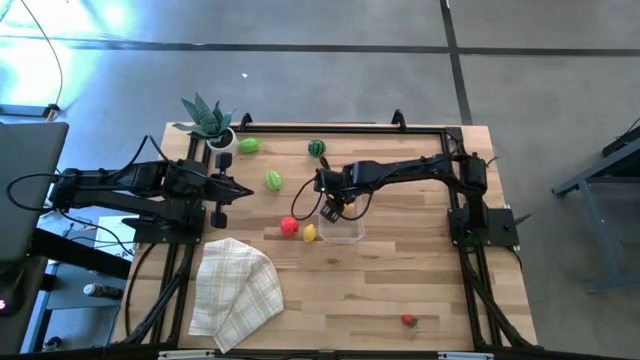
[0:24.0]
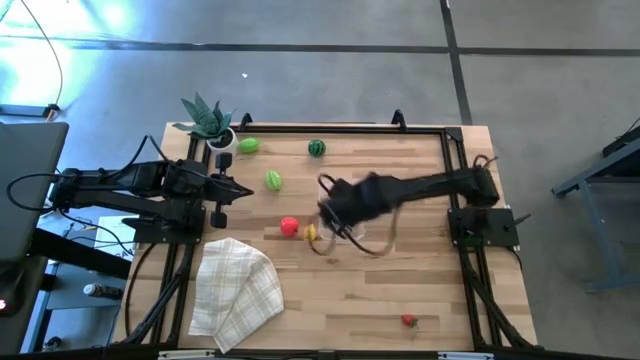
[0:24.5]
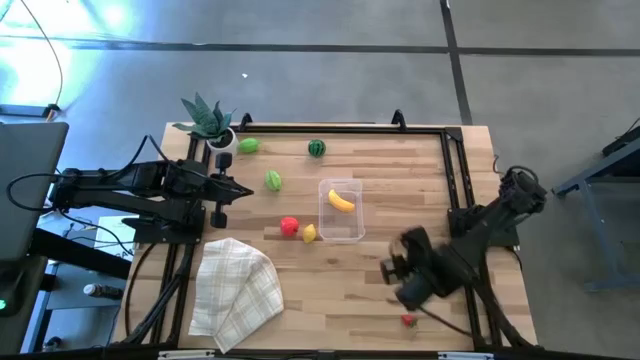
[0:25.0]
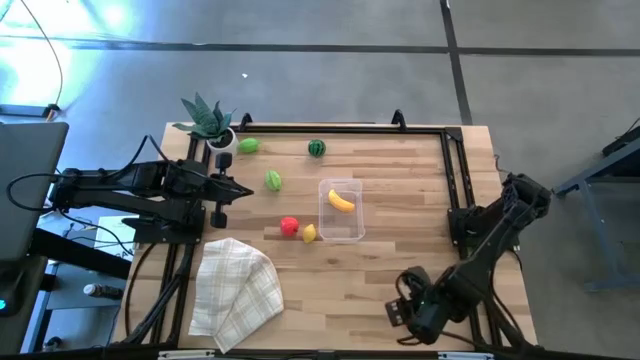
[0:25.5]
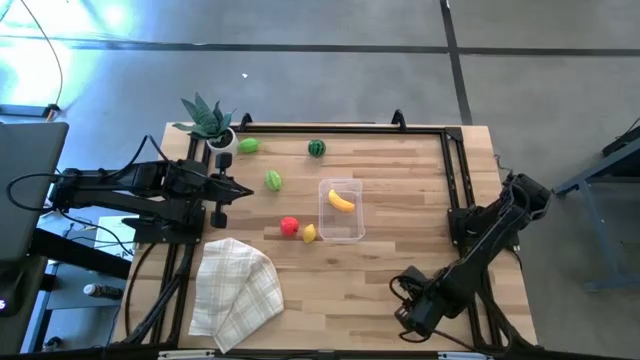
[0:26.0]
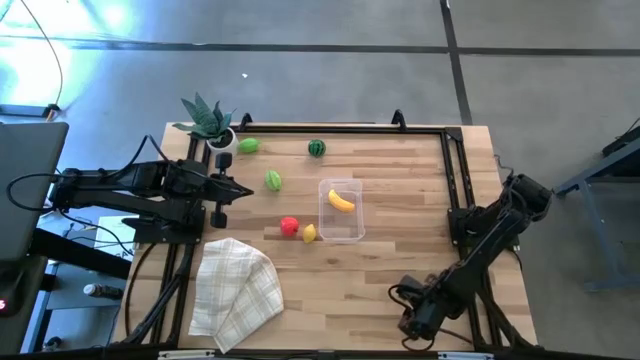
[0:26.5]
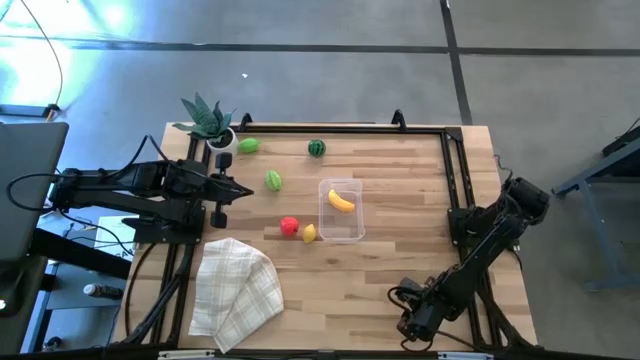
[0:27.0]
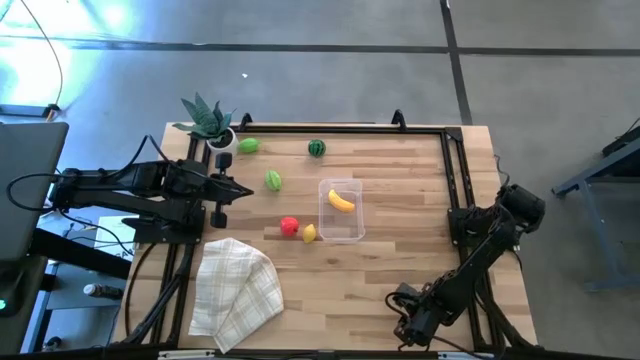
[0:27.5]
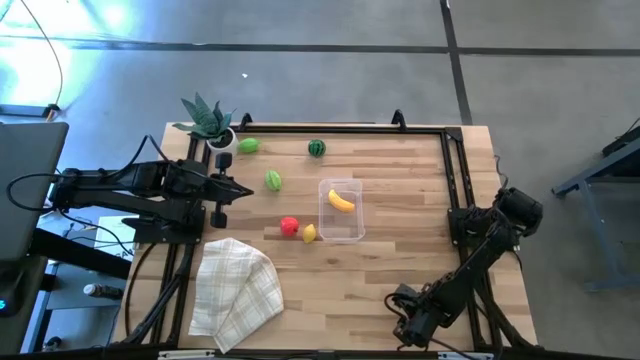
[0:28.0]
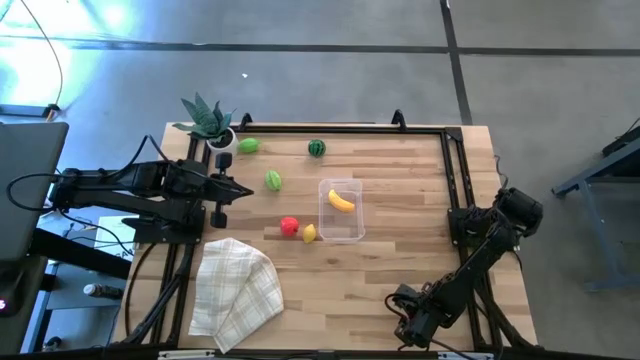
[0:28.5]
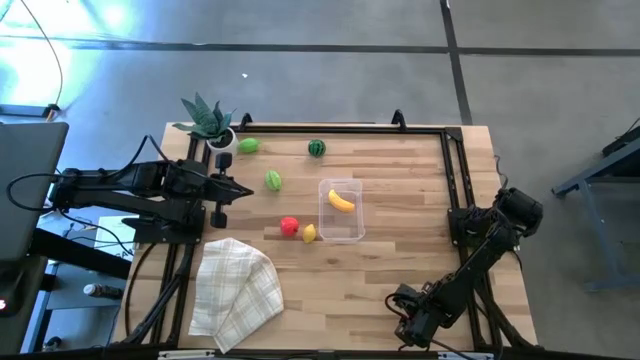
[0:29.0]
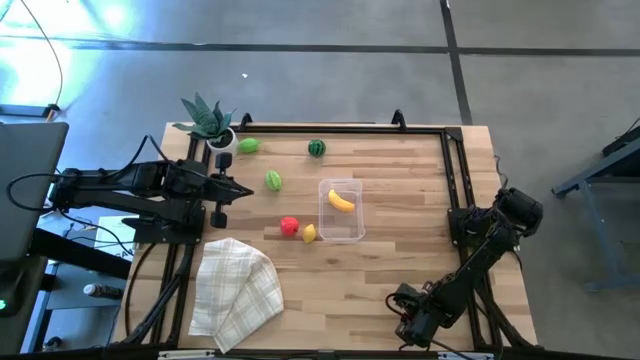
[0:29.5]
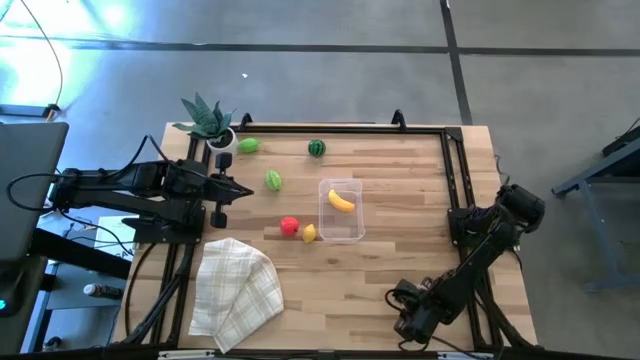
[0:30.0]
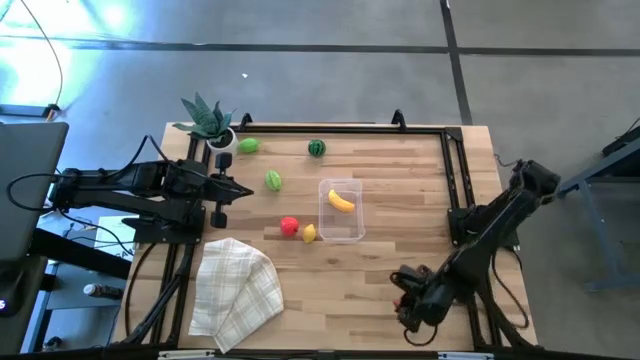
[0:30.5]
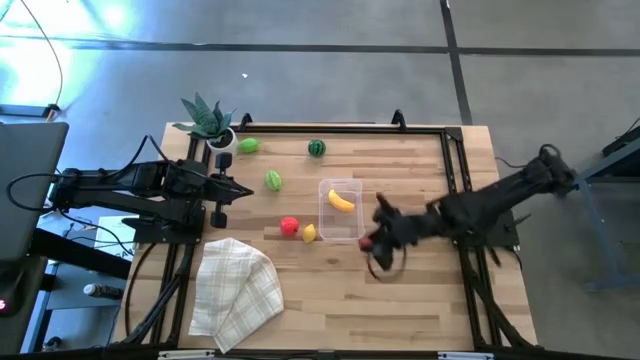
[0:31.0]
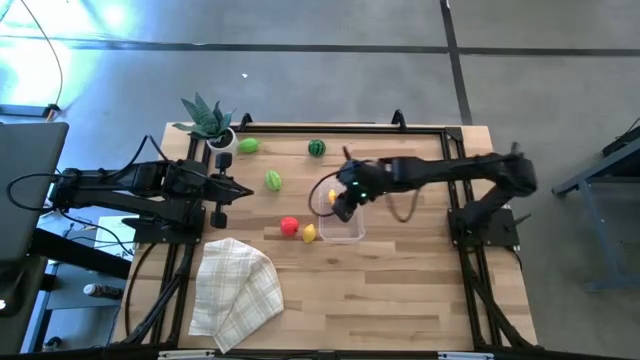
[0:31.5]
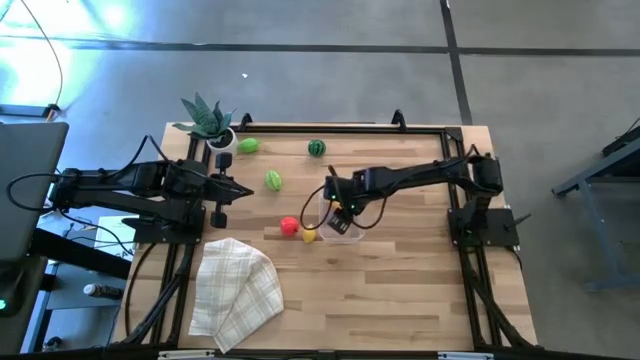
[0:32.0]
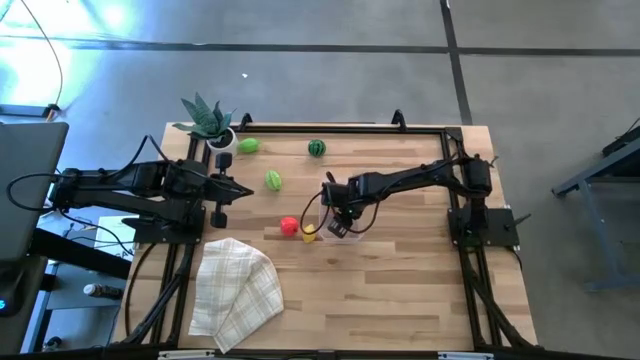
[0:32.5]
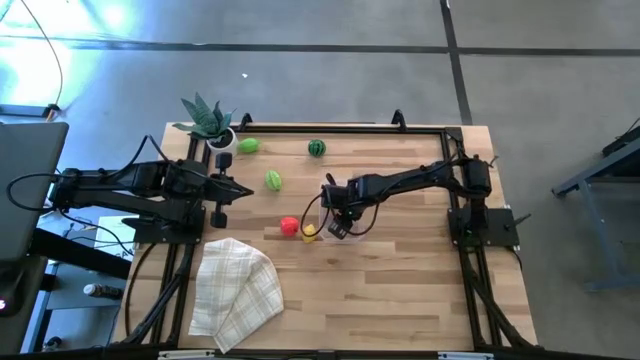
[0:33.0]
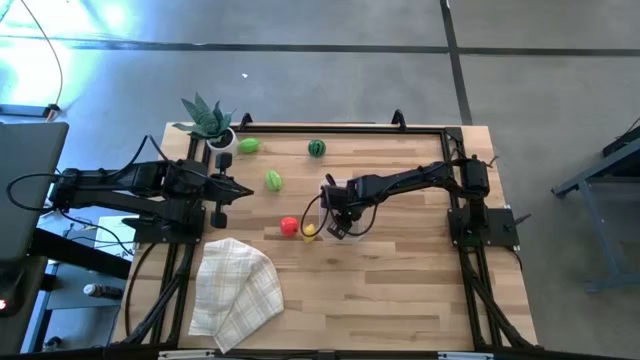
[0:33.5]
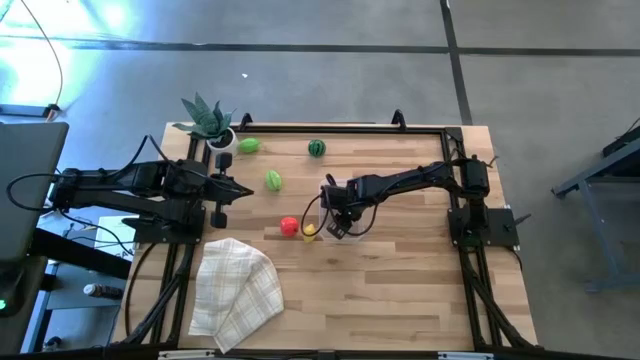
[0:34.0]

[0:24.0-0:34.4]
Task: Pick and placing Produce into tupperware
Put the strawberry into the transparent bin

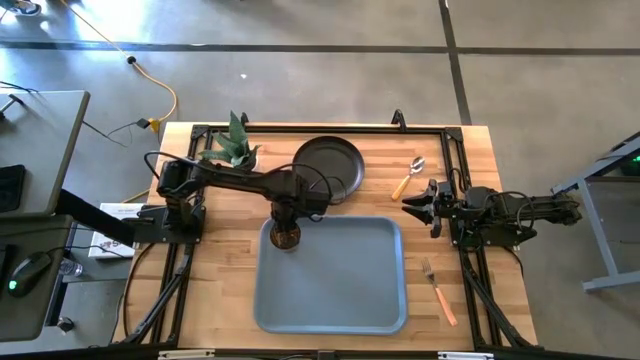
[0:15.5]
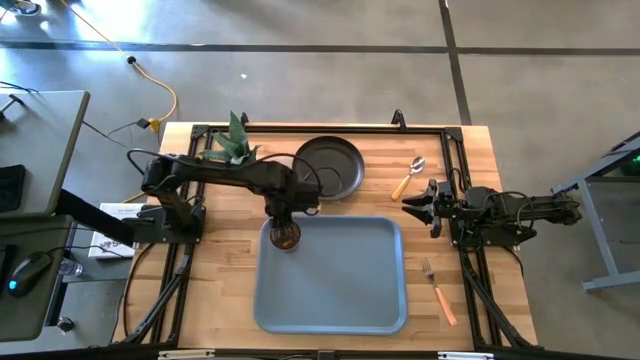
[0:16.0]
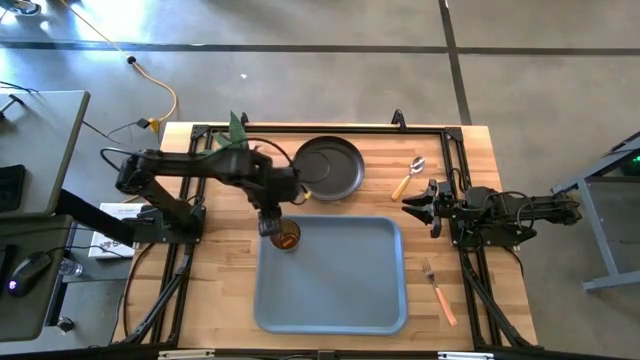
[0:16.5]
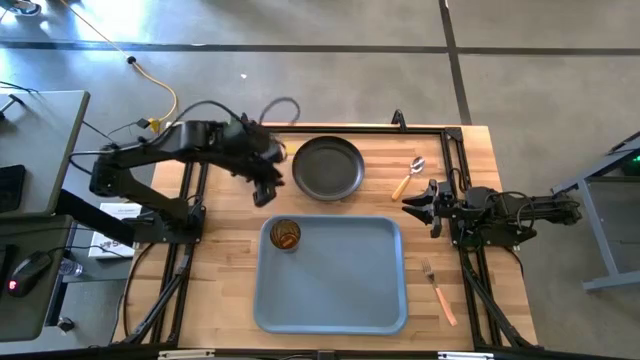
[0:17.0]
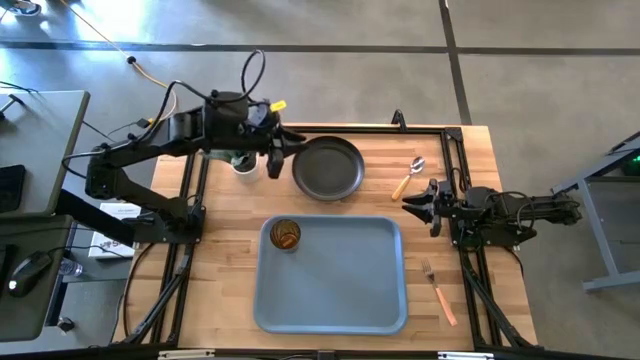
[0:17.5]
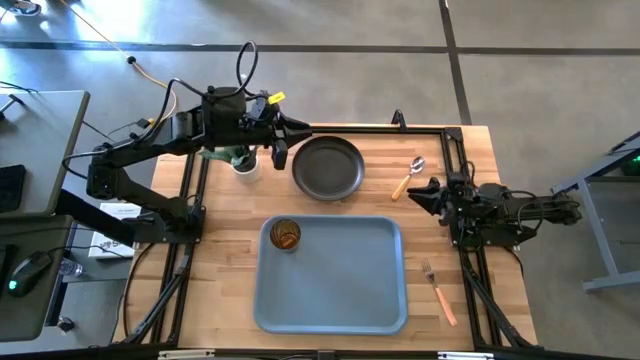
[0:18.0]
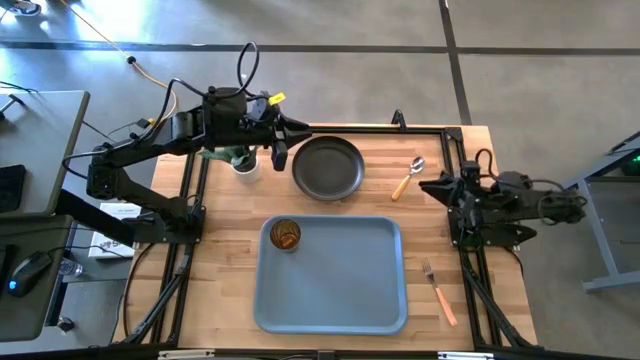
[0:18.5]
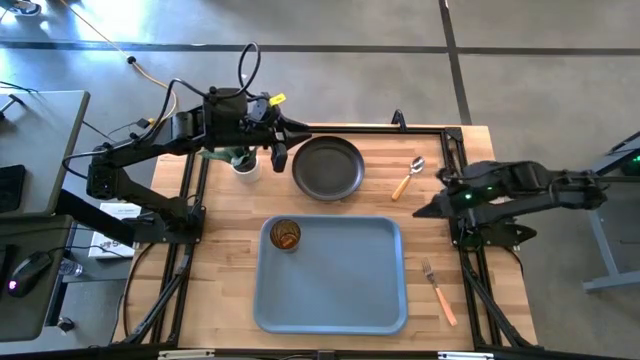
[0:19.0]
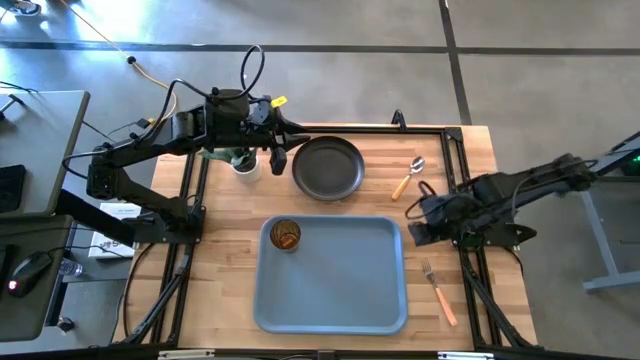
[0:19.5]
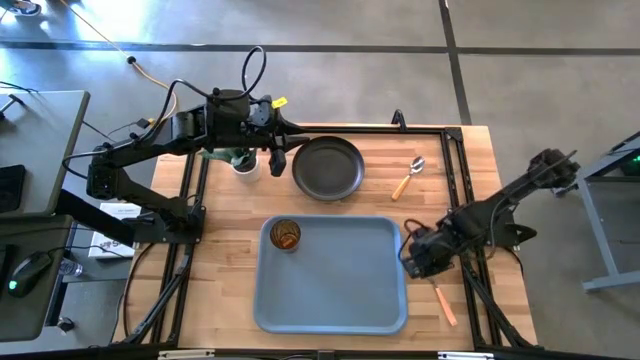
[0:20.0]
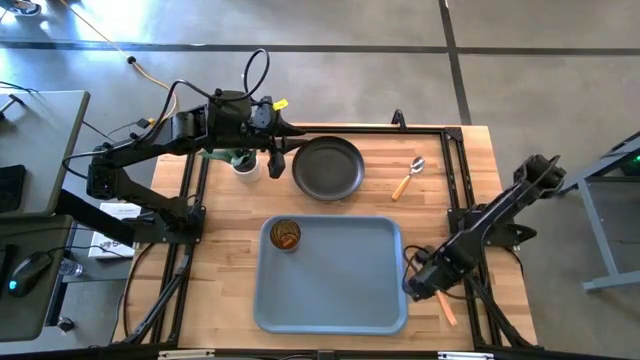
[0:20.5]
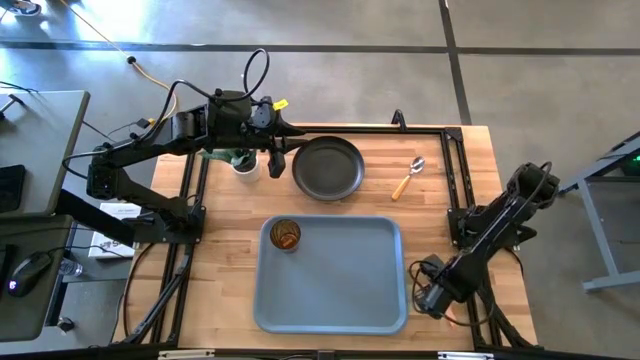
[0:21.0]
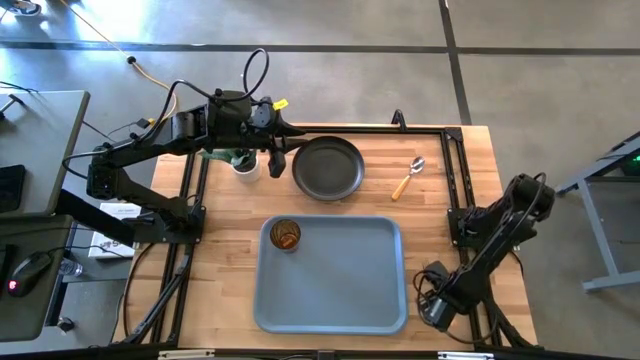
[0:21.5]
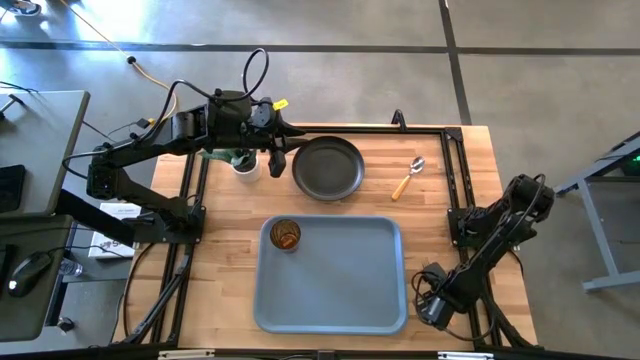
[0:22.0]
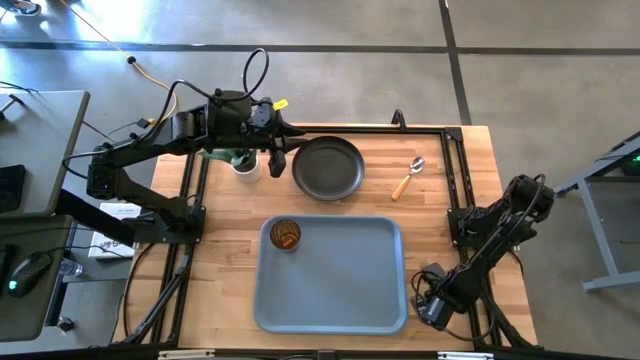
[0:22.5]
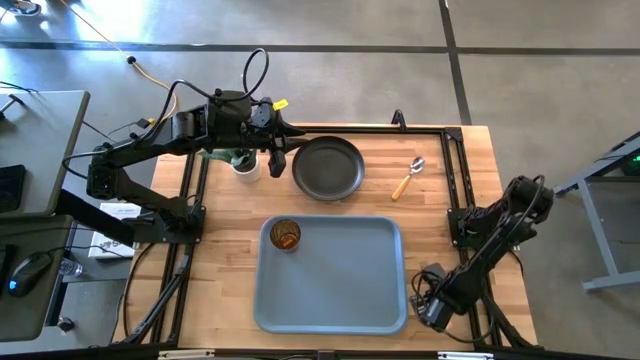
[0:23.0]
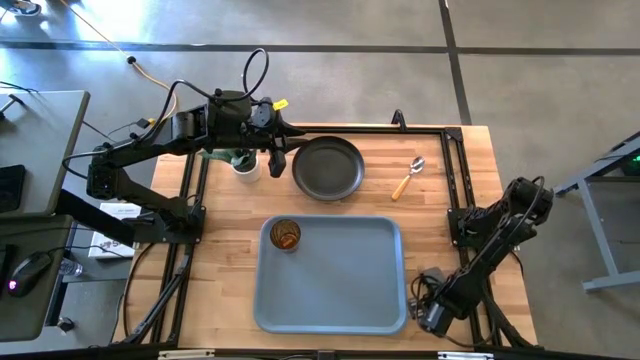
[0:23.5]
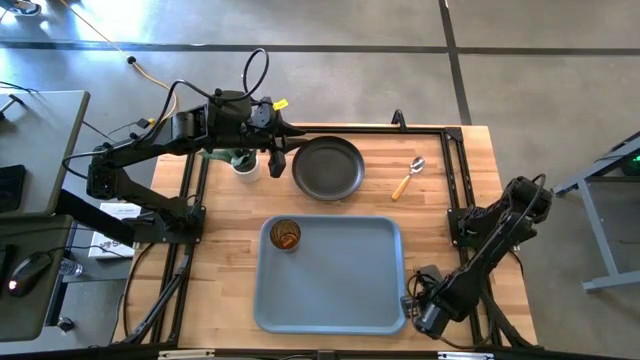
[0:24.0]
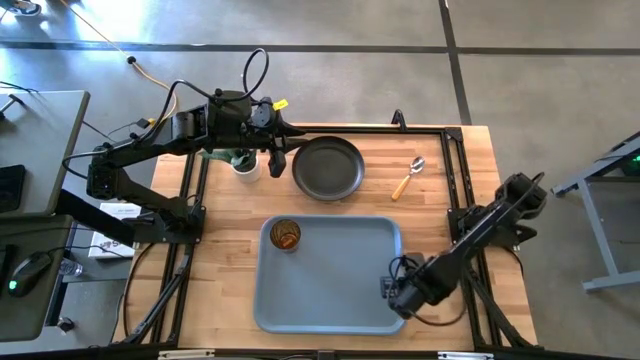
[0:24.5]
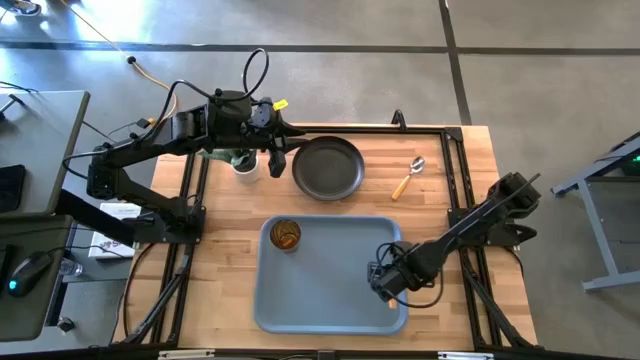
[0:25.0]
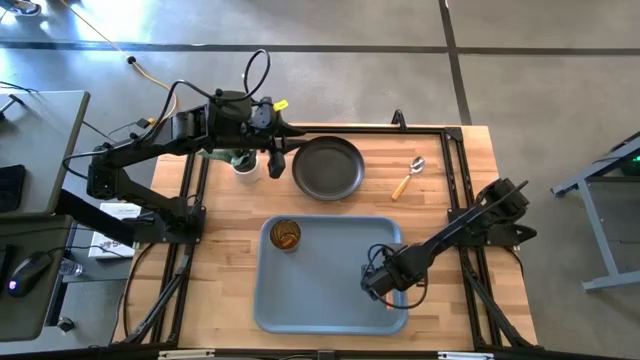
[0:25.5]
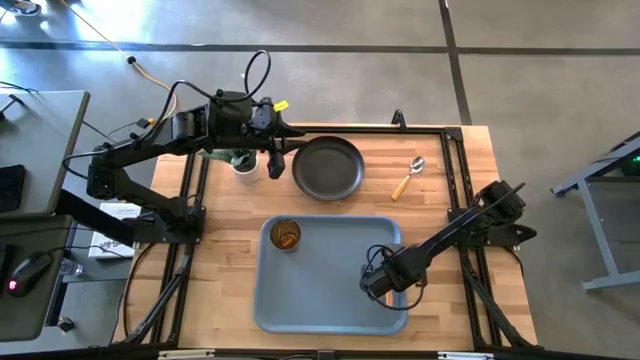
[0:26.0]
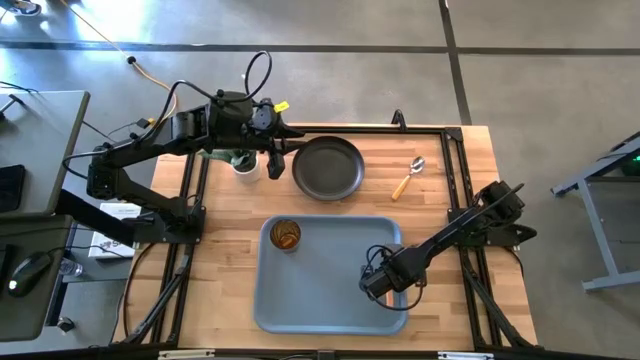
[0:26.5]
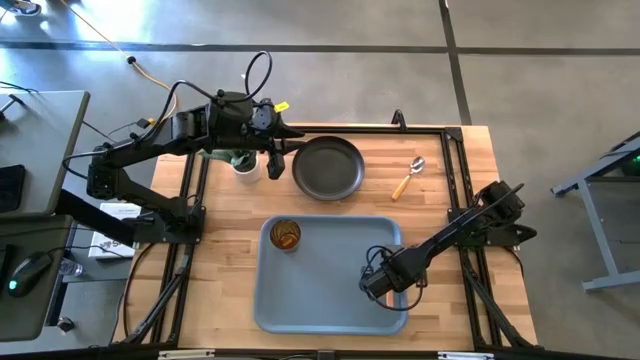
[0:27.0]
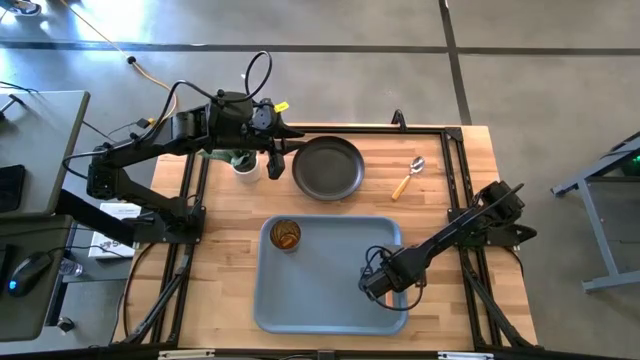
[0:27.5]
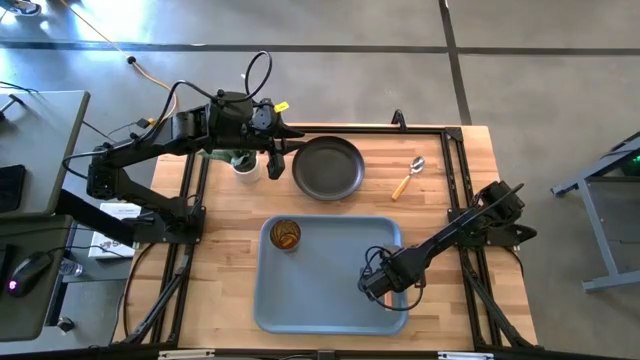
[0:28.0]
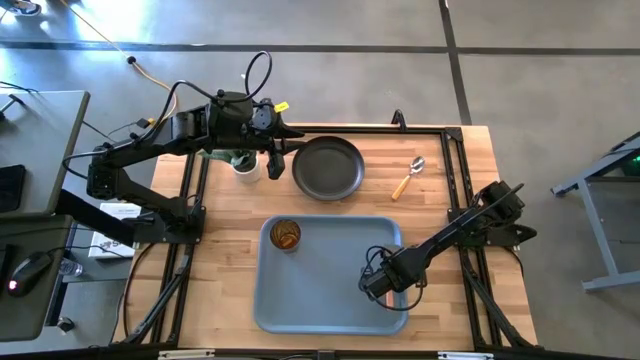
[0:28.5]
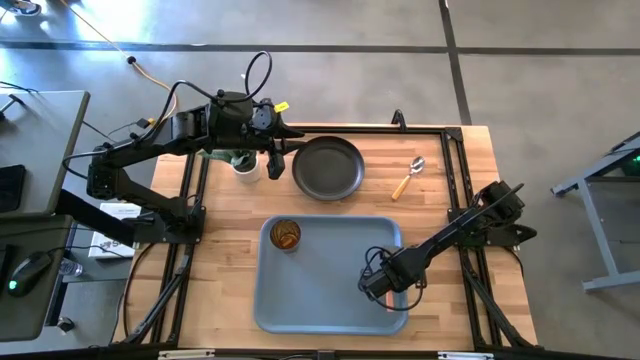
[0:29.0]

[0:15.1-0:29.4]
Task: Pick and place plate/cup/fork/spoon on tray
Put the yellow fork to the middle right on the blue tray
